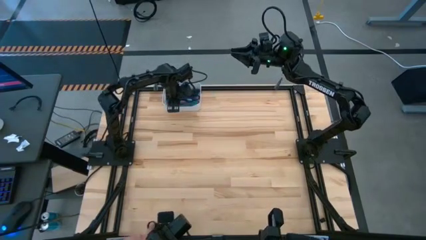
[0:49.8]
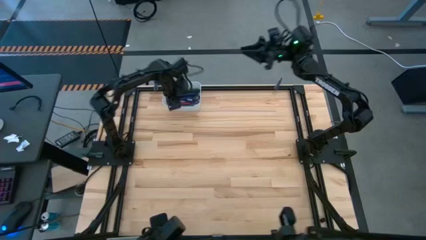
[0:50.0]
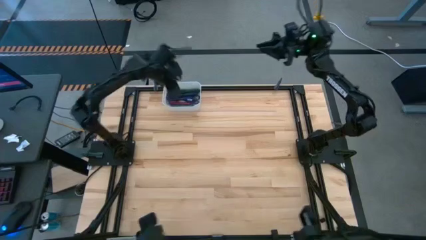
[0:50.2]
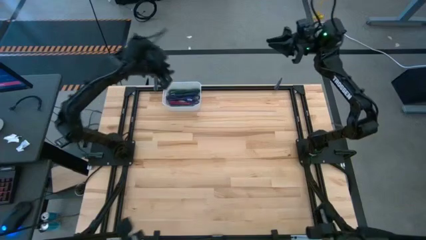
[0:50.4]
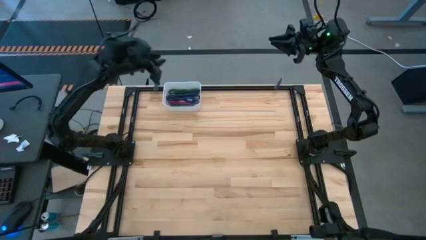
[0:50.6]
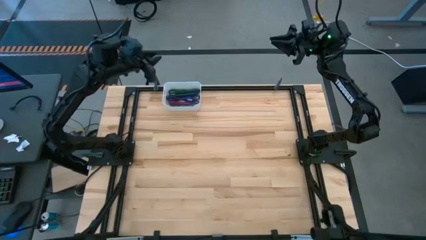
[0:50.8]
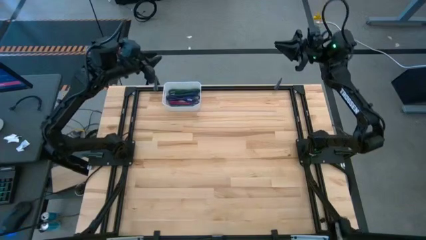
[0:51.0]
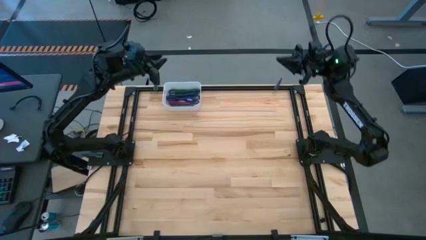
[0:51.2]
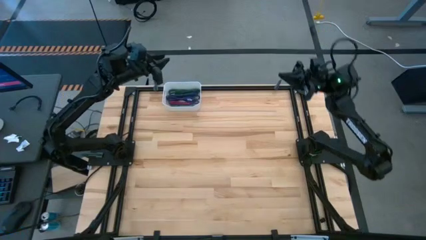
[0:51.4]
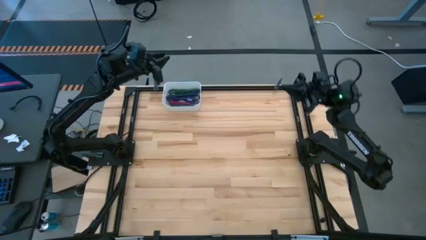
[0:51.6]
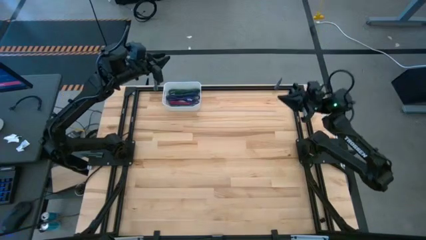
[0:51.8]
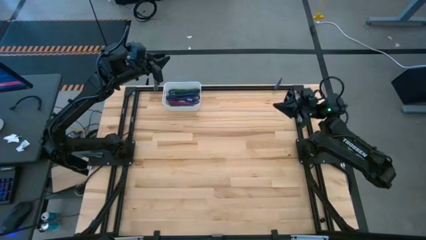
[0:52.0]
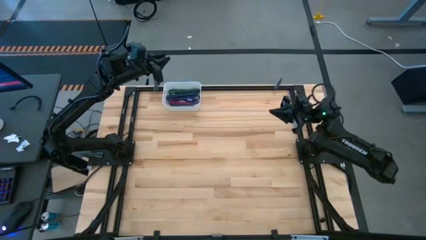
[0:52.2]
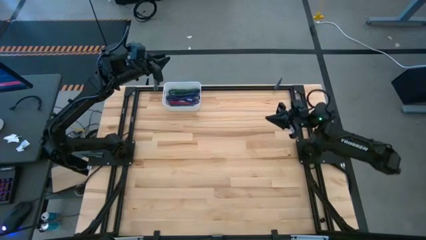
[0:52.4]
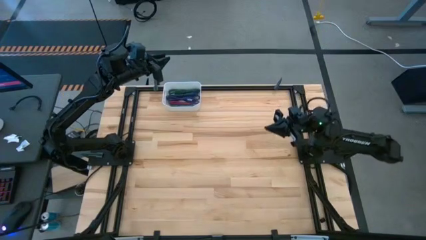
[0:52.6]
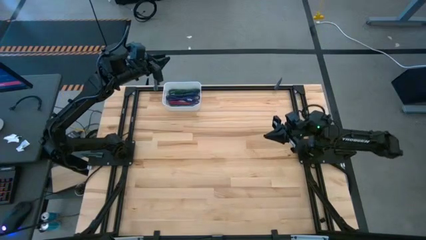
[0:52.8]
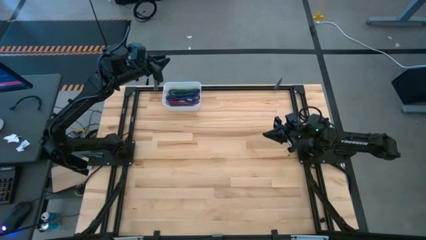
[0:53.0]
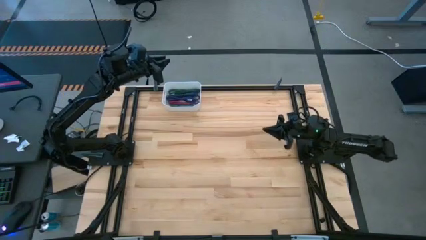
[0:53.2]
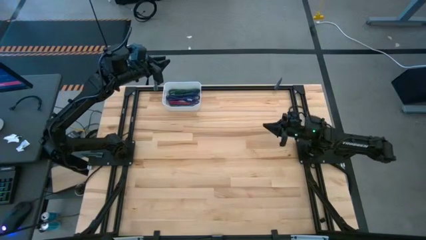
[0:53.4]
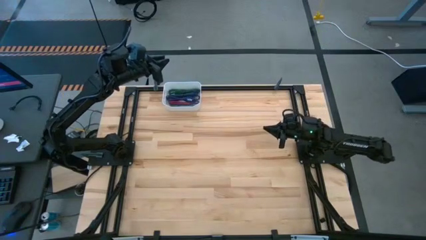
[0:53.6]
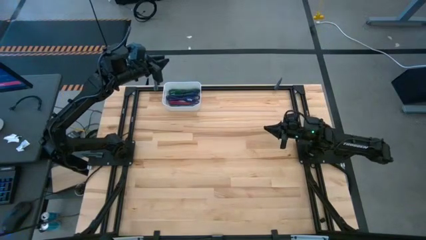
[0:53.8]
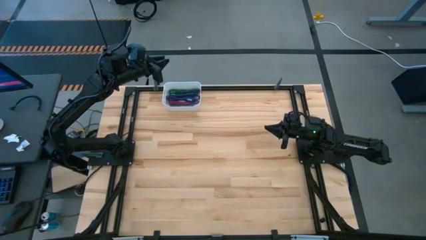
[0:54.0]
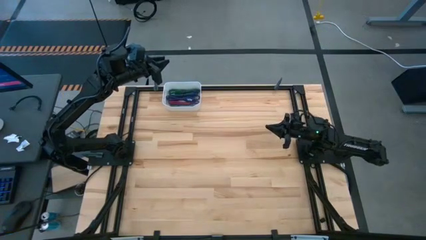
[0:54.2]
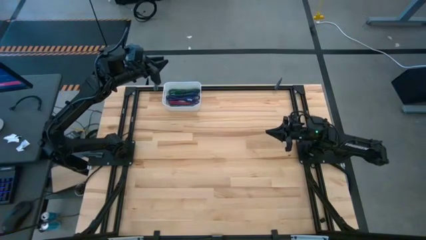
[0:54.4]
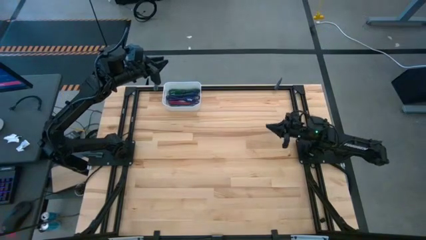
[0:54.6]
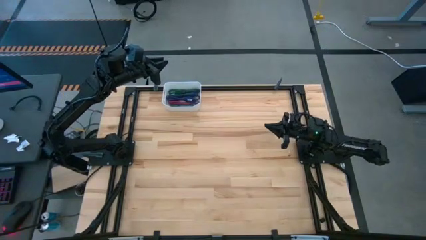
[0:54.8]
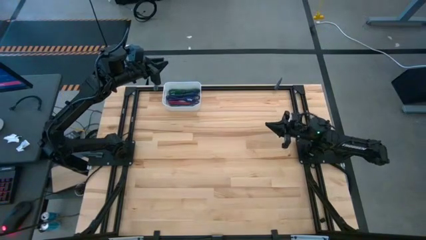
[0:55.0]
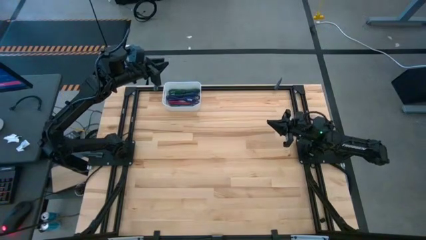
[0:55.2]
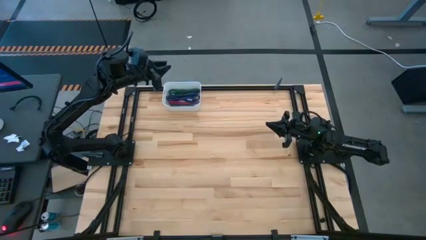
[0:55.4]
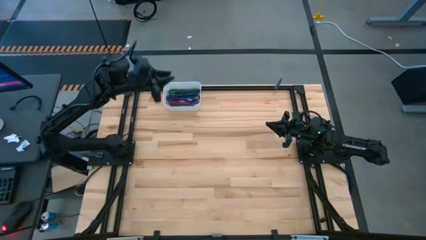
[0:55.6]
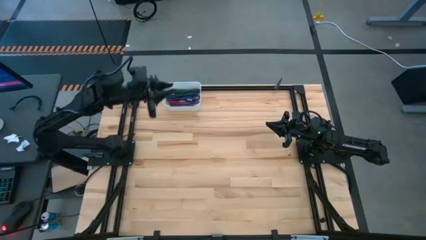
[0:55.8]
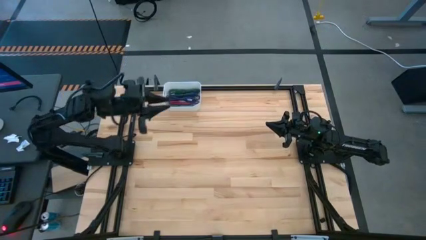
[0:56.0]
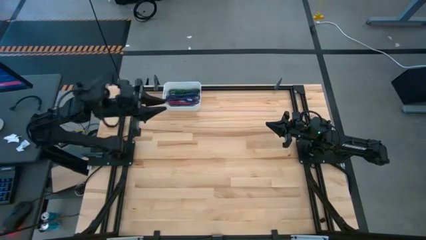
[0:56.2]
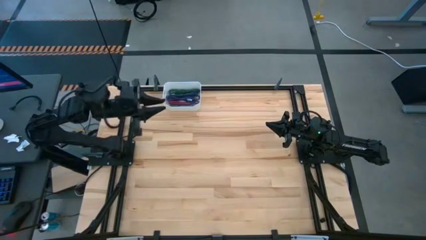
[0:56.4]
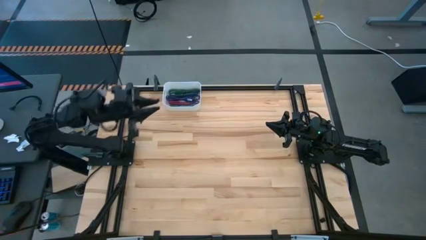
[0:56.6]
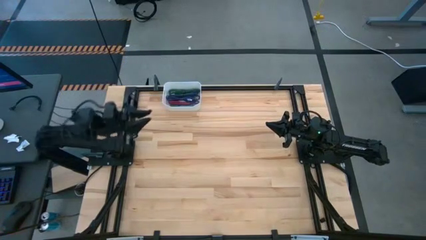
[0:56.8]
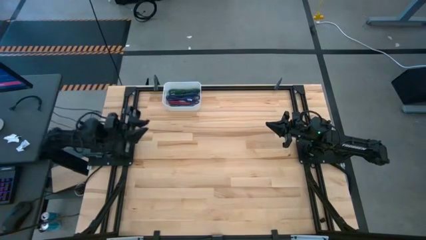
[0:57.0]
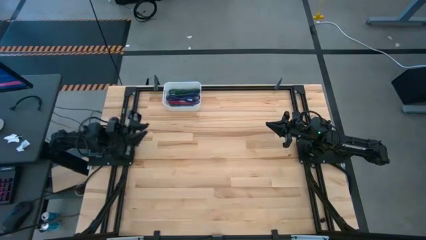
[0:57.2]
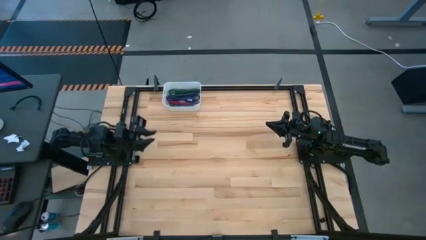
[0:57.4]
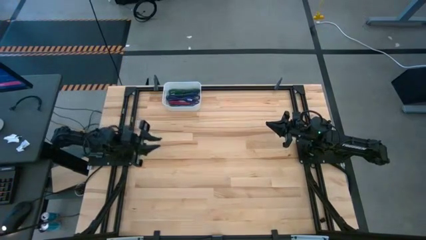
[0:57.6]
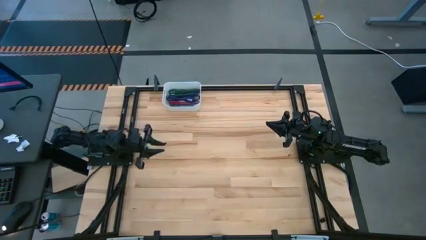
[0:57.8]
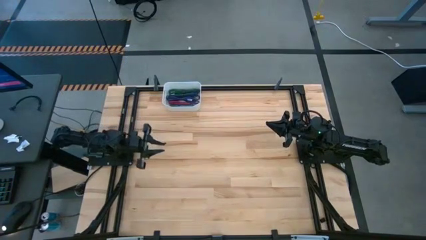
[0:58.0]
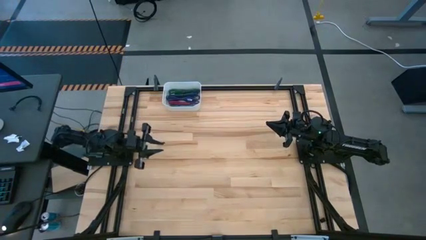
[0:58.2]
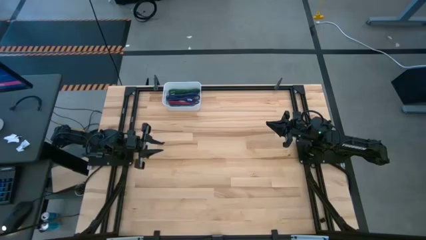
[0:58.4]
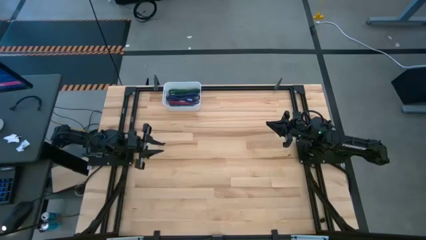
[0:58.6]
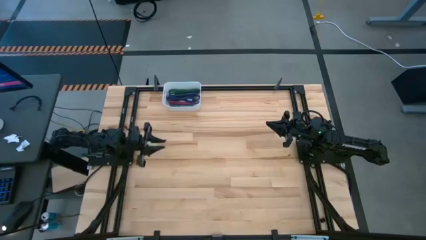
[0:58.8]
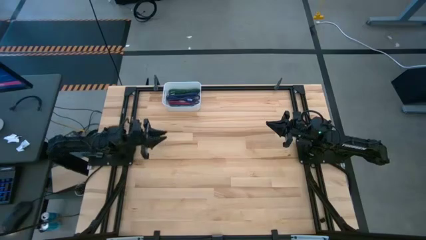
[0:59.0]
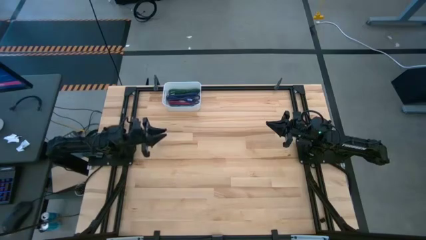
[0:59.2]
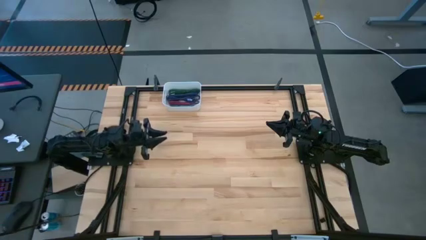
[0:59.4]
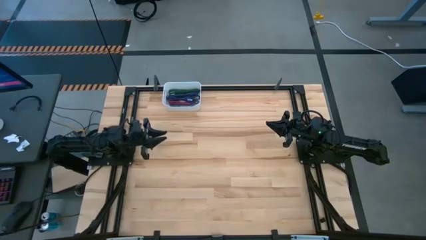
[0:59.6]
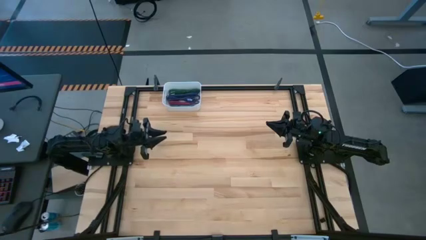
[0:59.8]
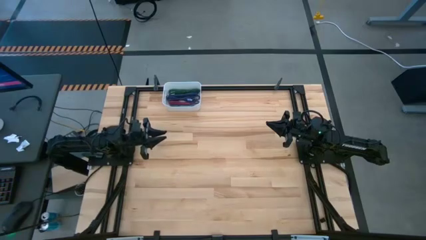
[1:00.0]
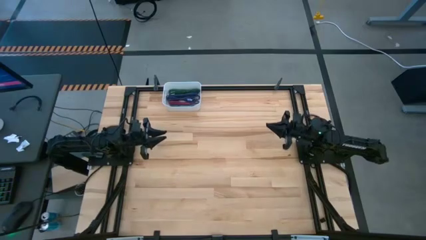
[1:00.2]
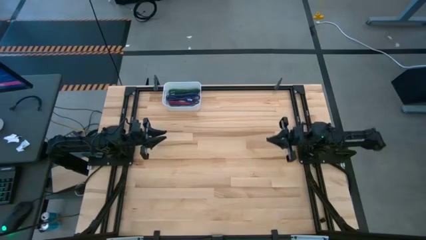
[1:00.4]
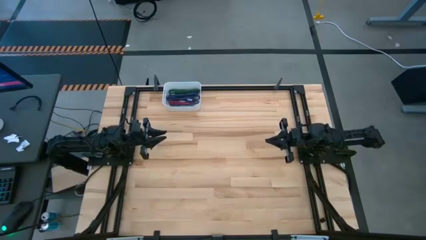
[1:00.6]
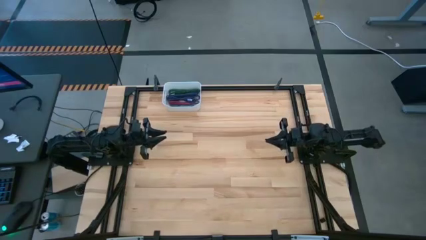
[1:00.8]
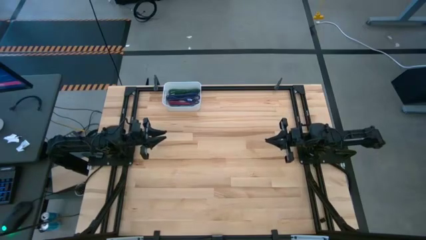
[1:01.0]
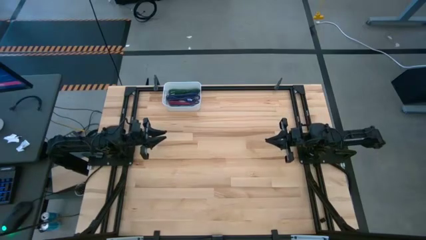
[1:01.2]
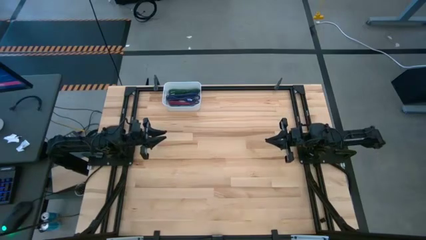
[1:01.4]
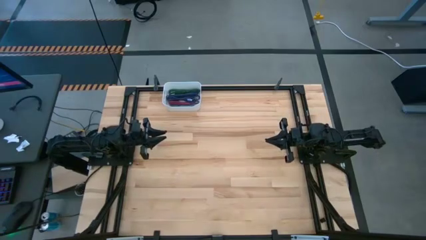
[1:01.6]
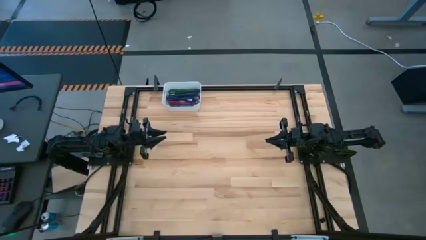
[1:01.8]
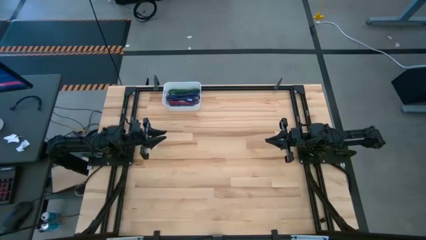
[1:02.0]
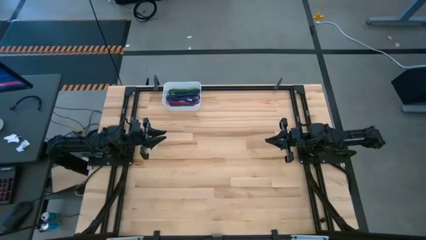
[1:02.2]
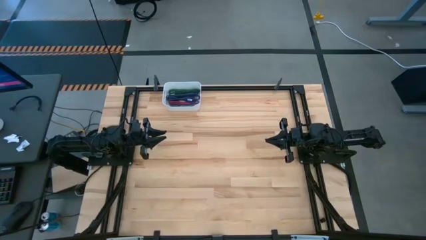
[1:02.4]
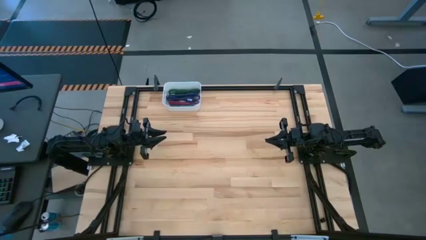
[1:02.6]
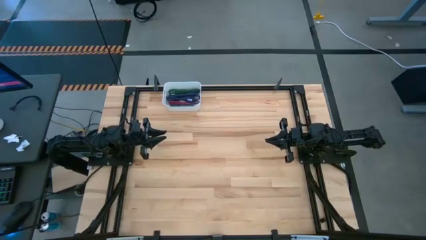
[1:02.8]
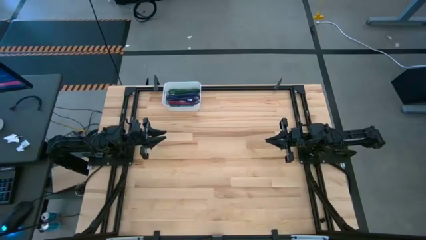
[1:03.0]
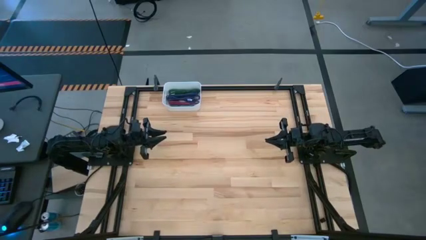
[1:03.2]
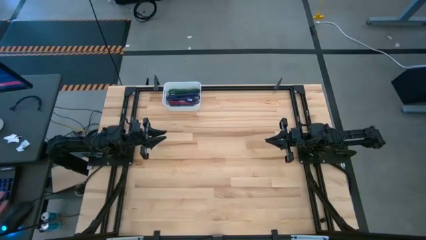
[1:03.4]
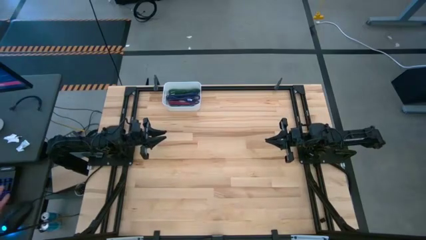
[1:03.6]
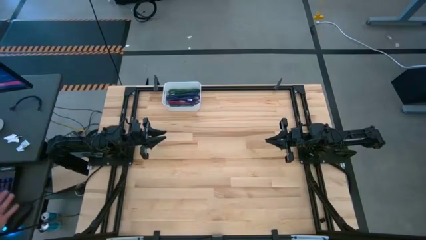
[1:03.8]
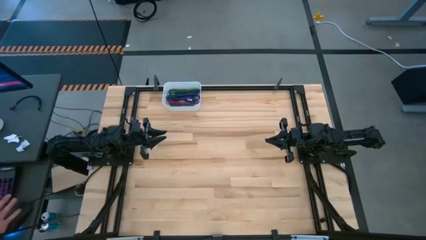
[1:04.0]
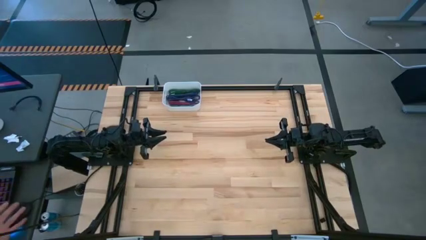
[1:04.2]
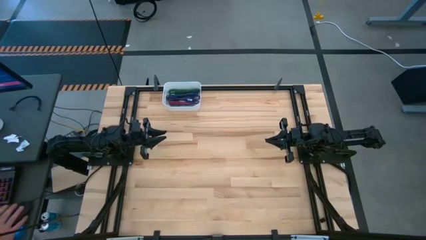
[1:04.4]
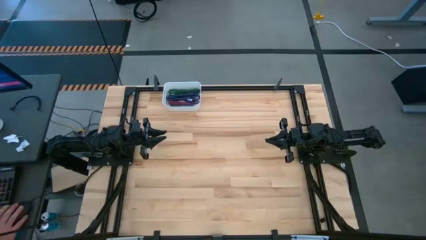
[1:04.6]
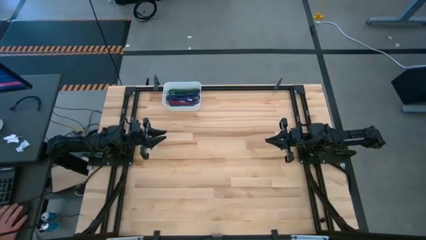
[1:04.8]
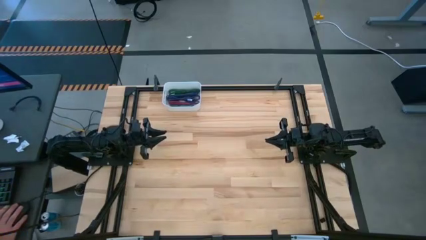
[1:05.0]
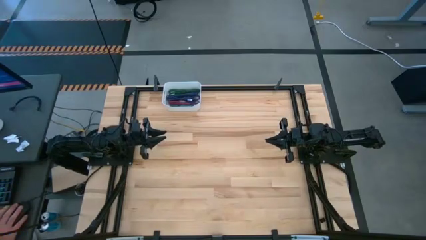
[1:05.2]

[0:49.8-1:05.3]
Task: Pick and place USB-C Cables
Return to Home Position

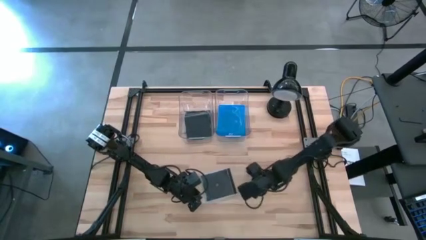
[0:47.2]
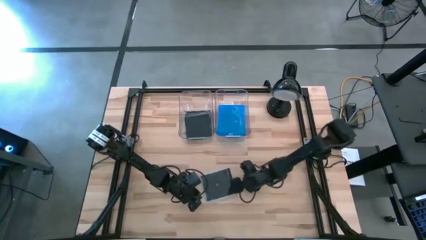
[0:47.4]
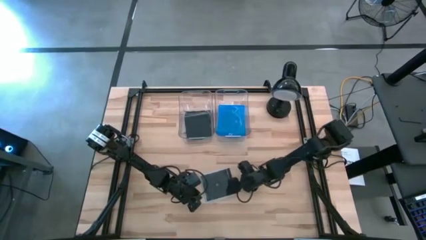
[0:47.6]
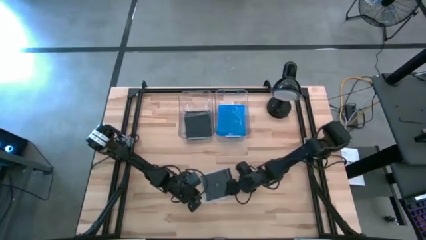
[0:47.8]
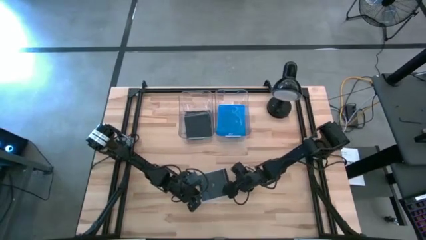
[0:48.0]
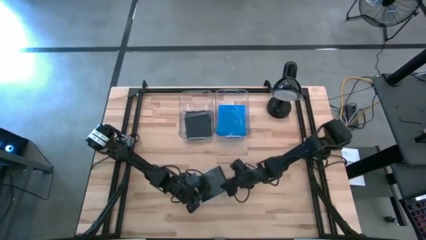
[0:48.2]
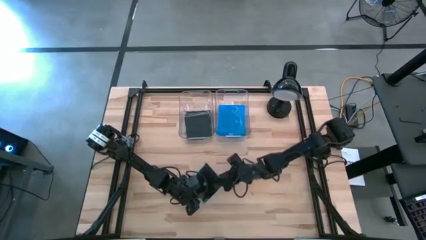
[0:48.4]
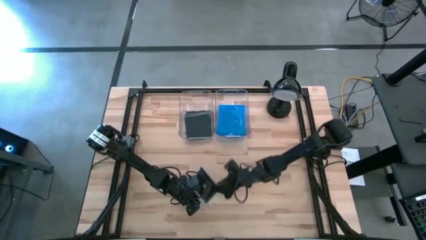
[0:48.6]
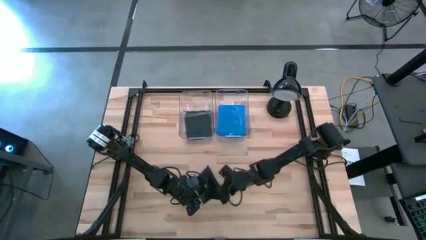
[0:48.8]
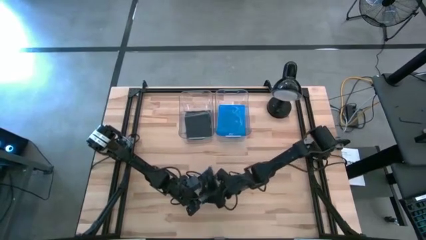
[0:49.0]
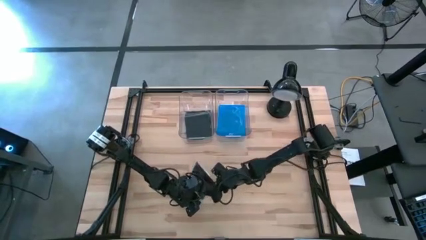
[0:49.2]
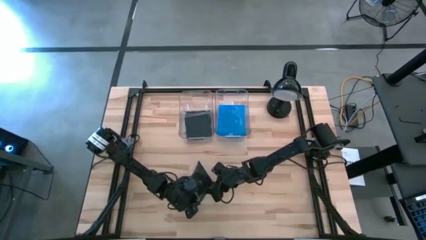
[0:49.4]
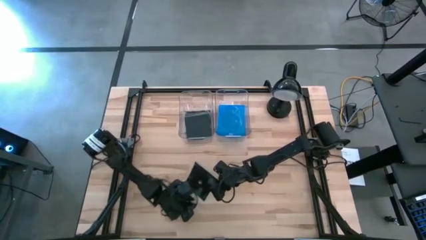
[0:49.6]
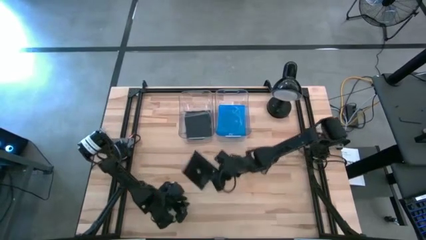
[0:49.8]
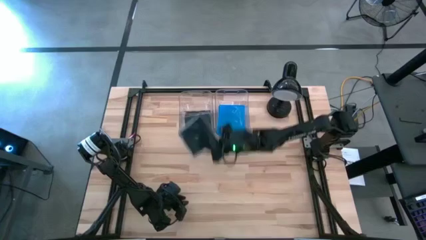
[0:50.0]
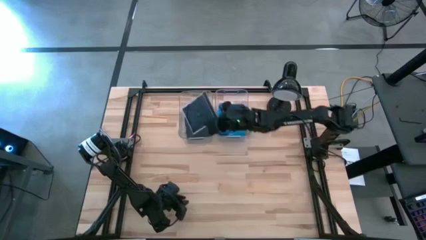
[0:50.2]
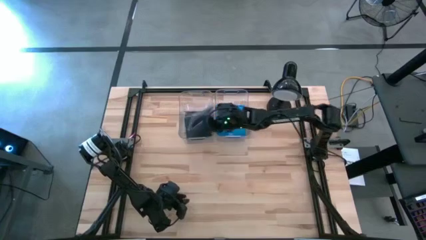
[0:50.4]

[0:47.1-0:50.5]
Task: Pick & place jewel cases by type
Put the black CD case into the left transparent bin
